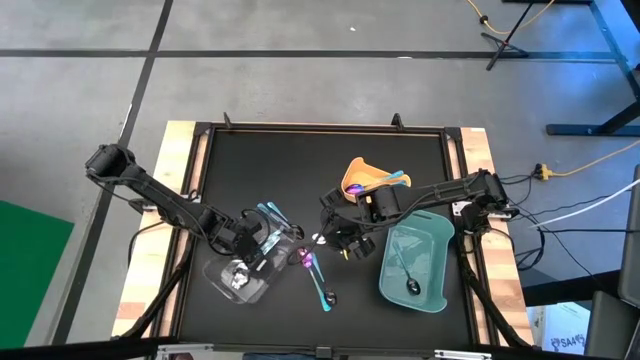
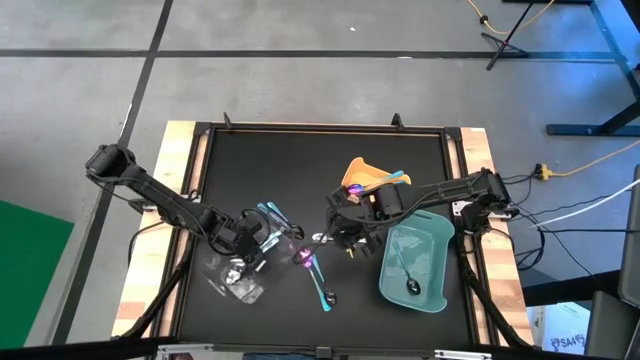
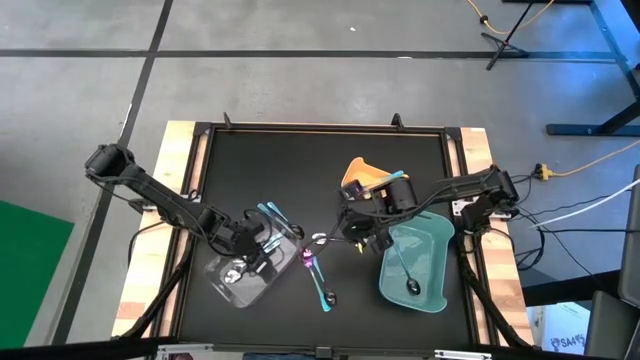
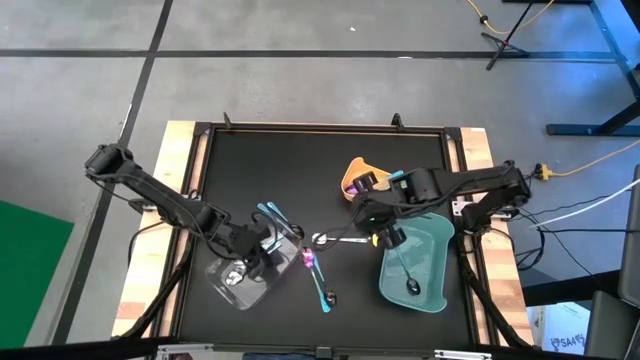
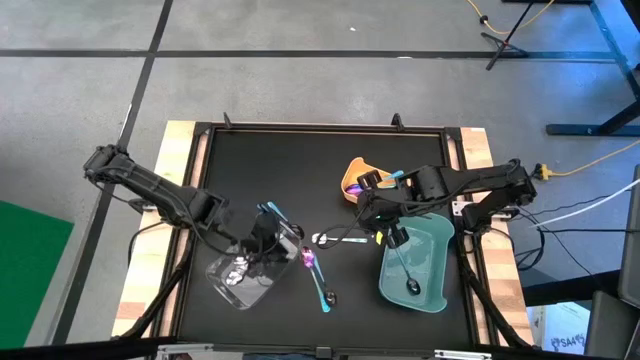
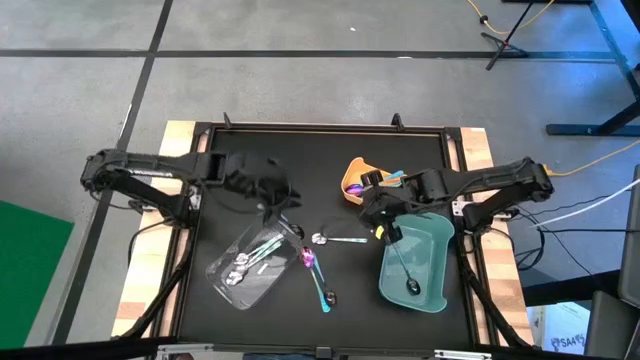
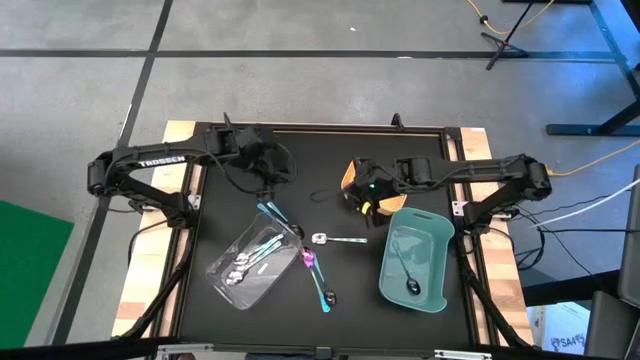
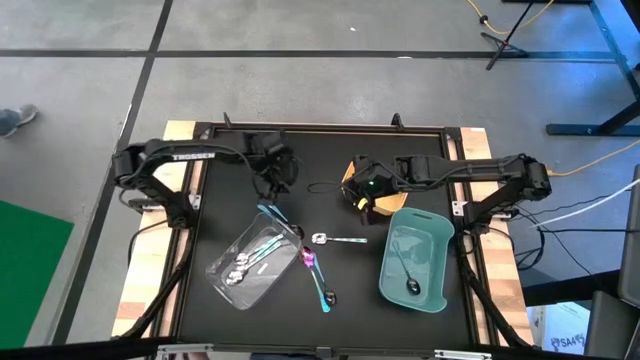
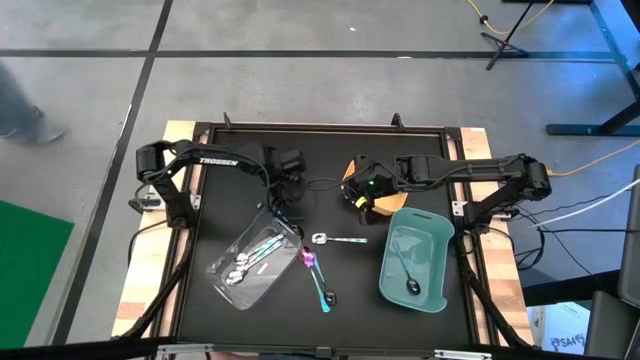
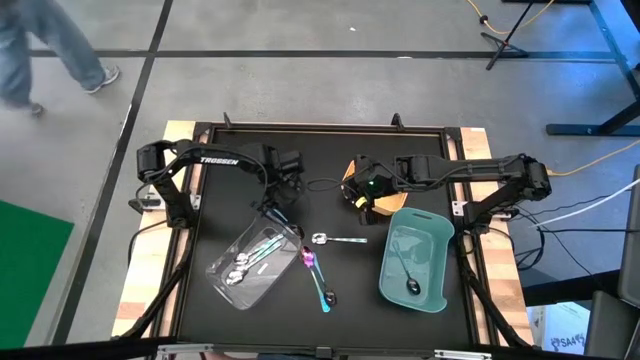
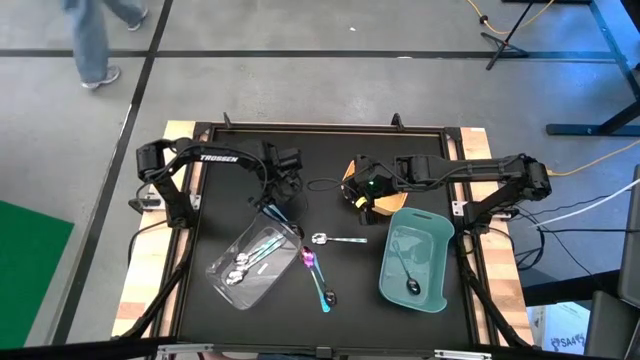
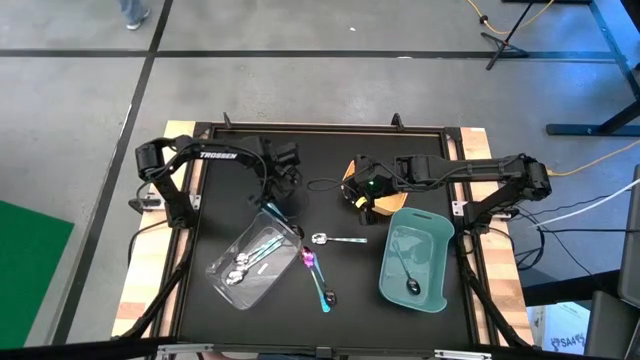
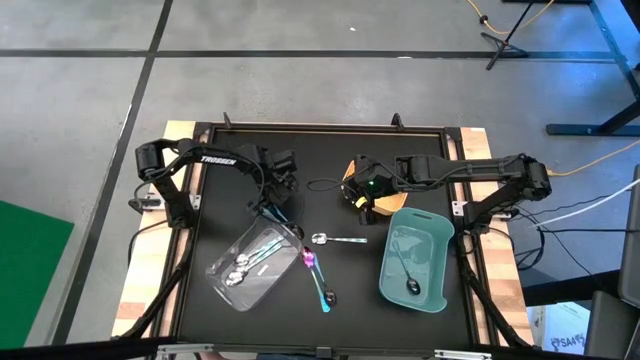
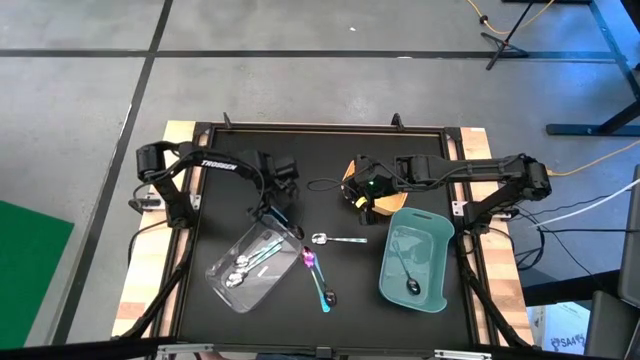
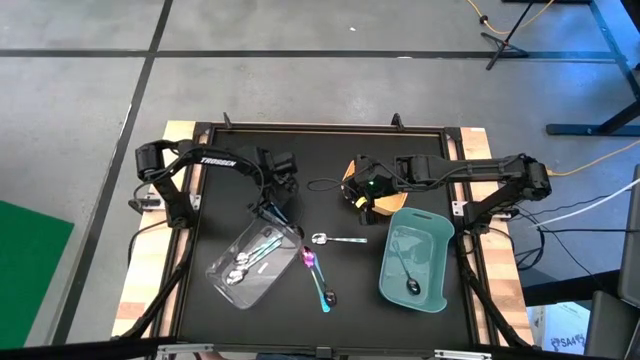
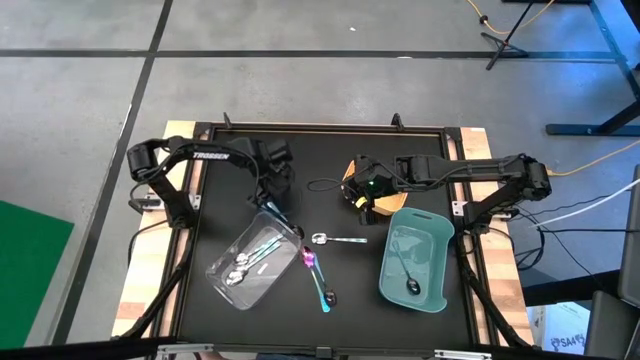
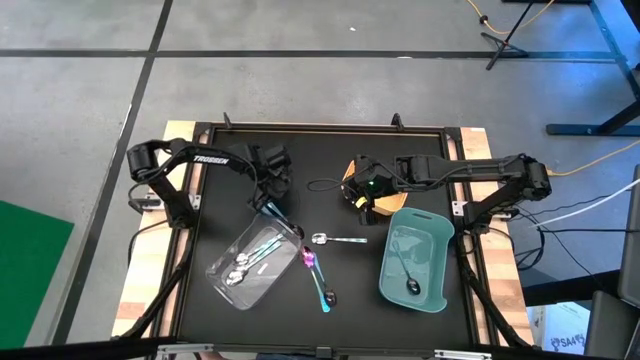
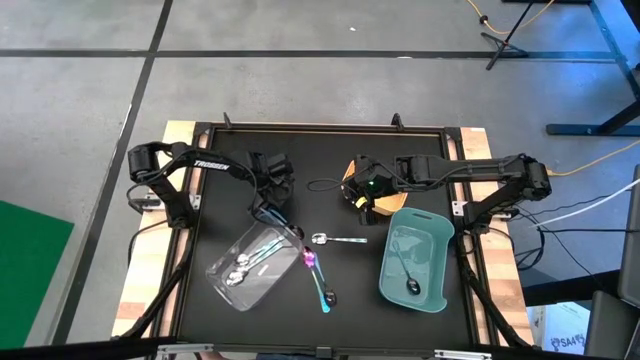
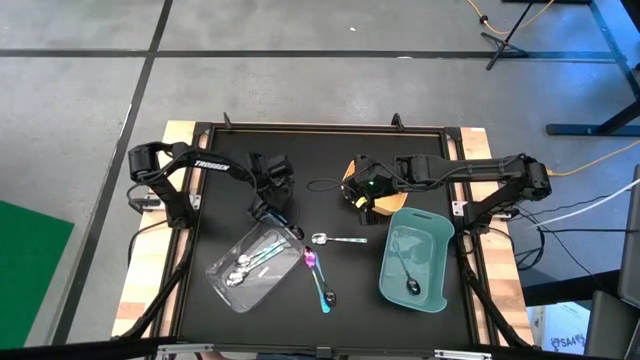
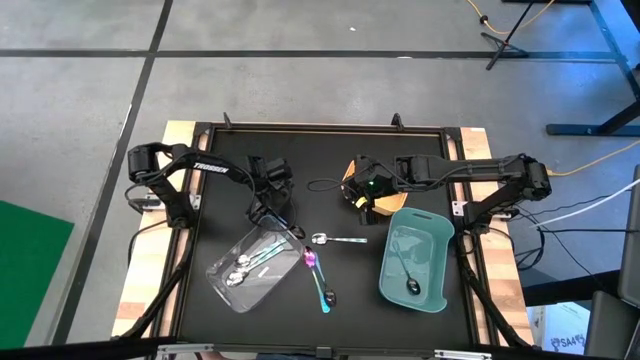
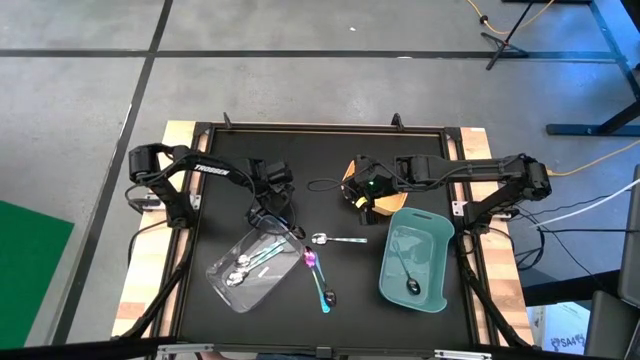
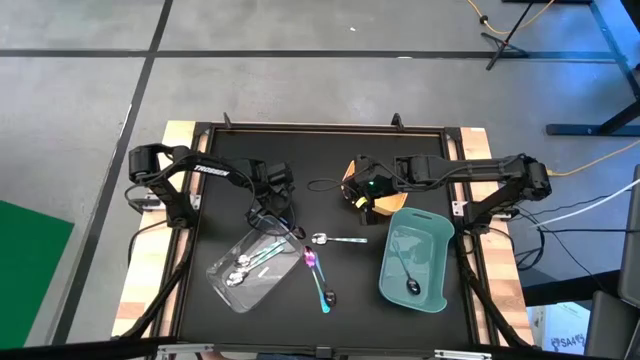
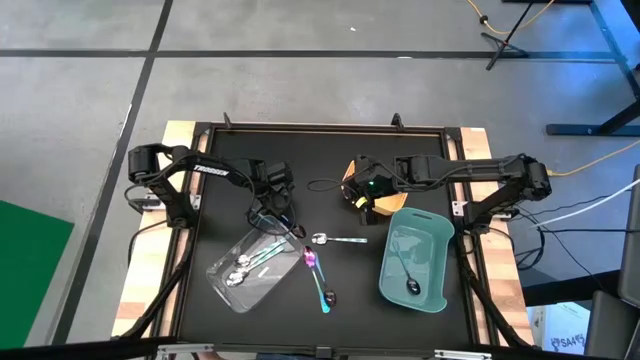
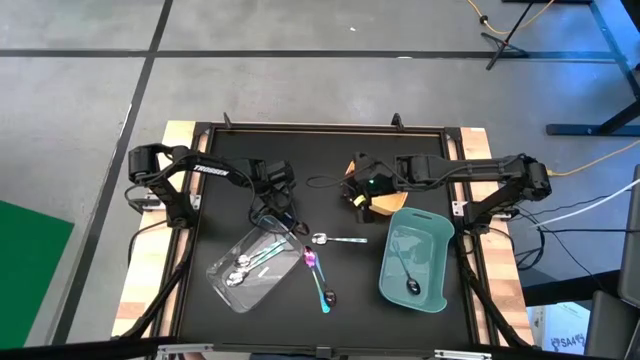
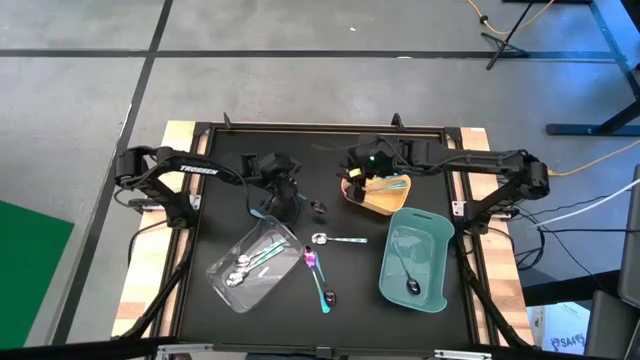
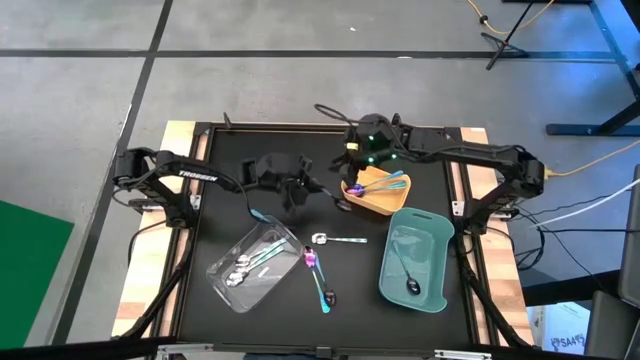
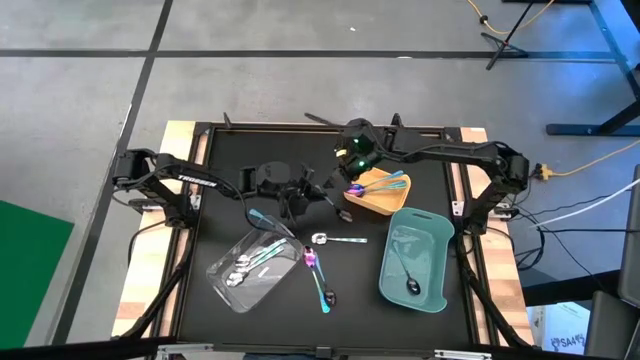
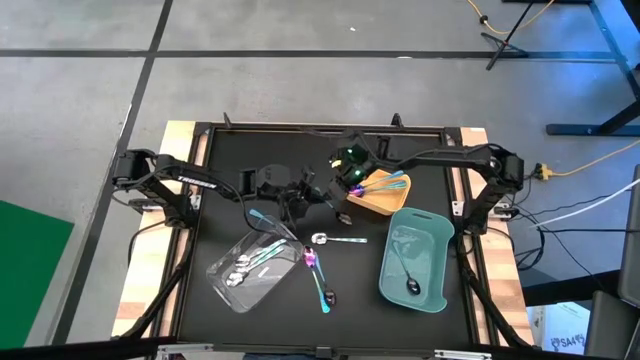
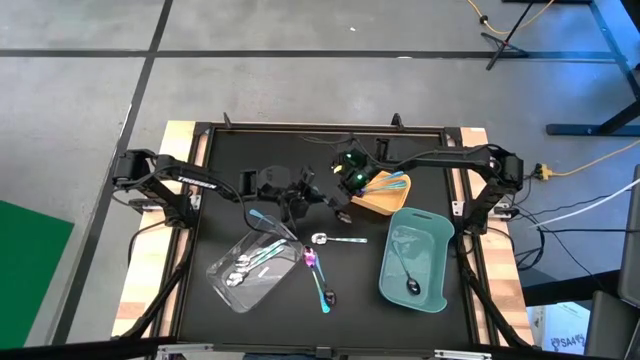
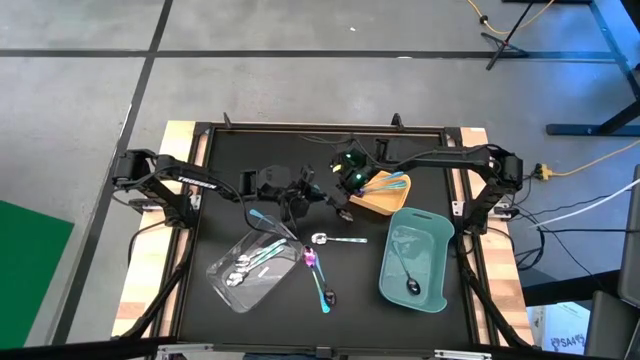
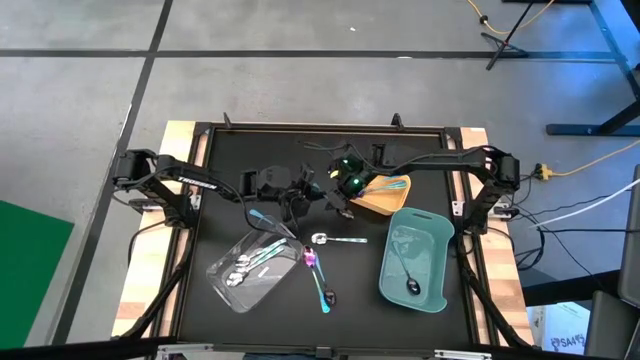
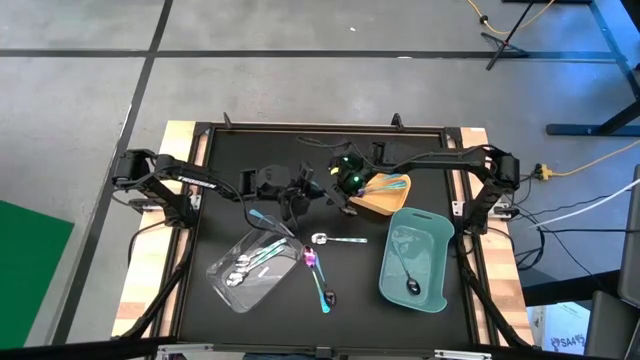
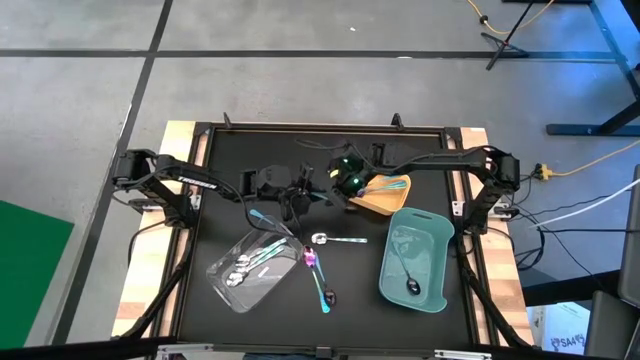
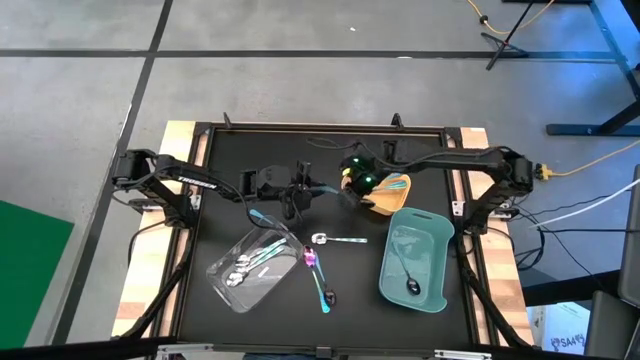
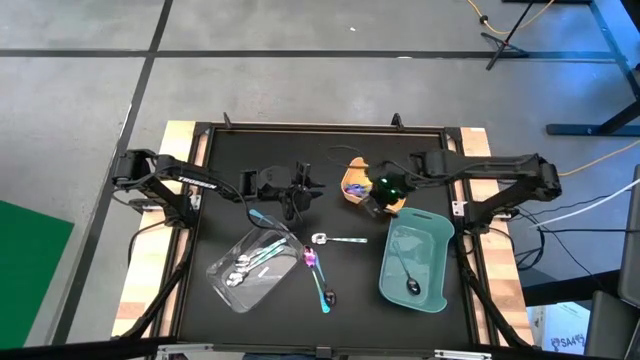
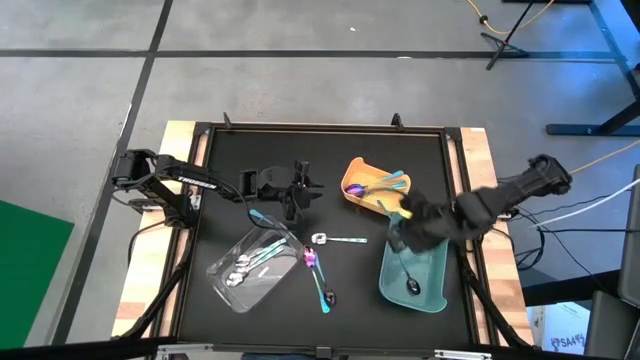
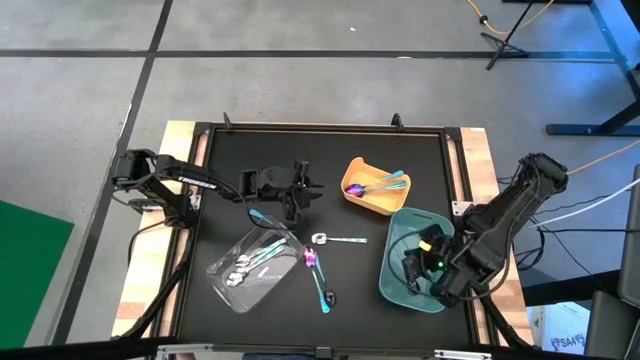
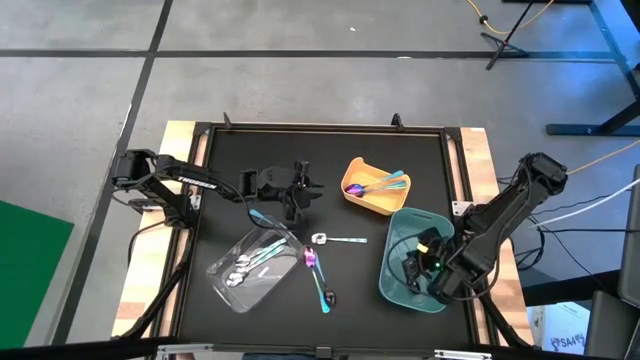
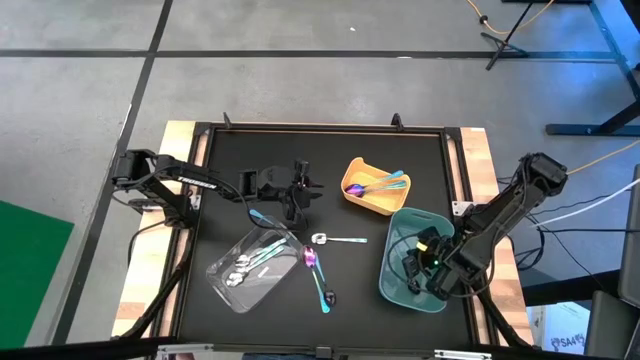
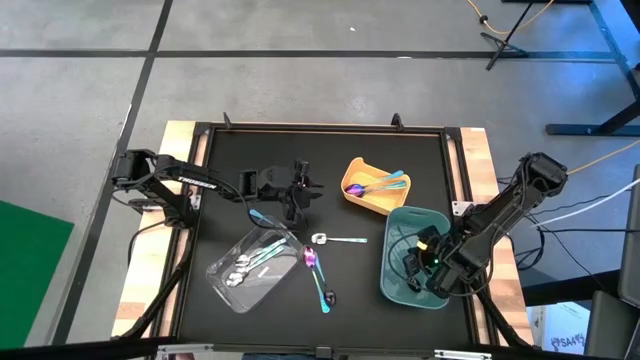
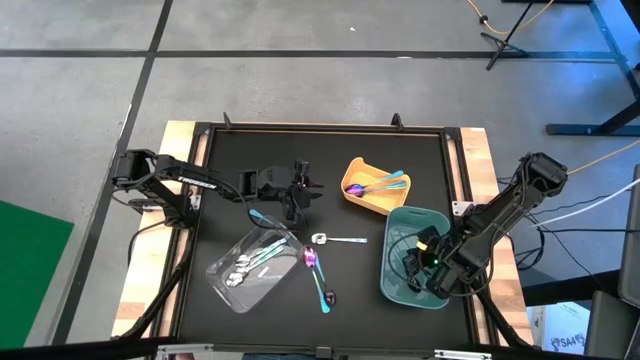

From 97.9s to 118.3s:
Task: Sort silverware by color (type)
Put the blue spoon into the blue bin

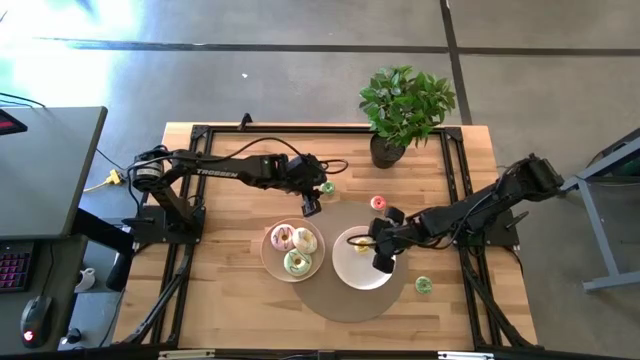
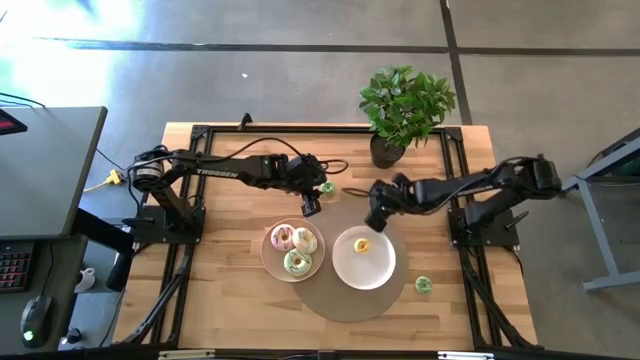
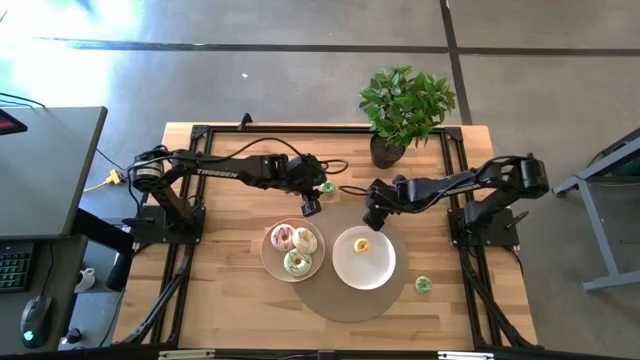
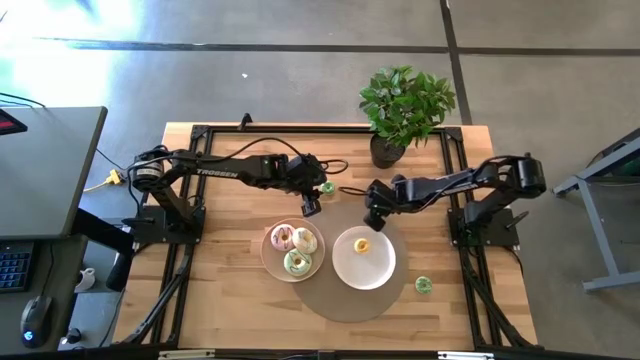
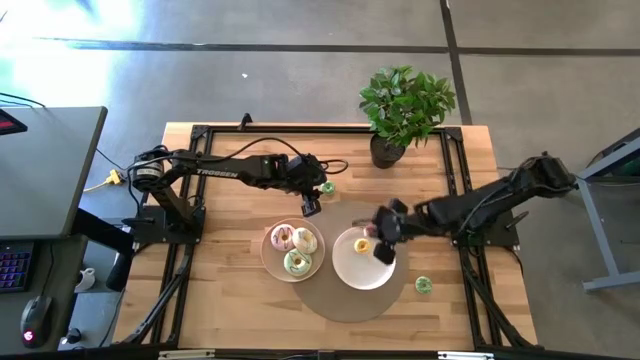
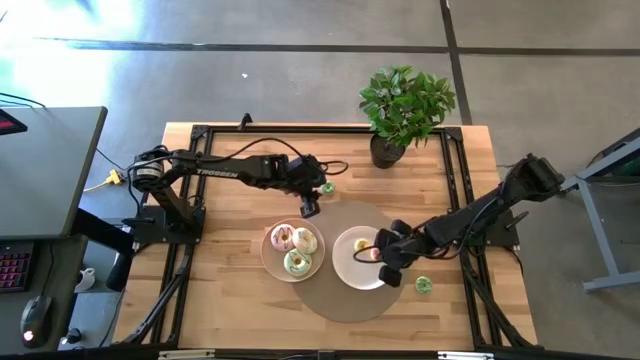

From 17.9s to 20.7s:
Task: Pick & Place donuts
Put the right small pink donut on the white plate
